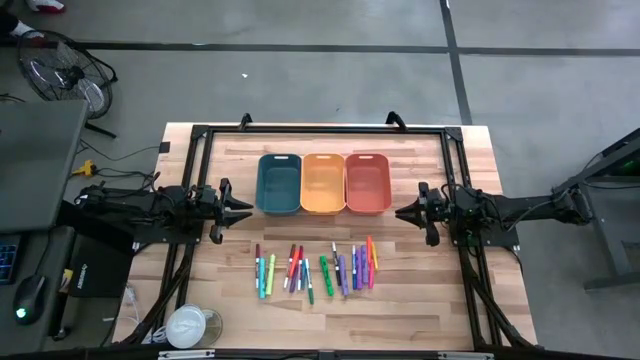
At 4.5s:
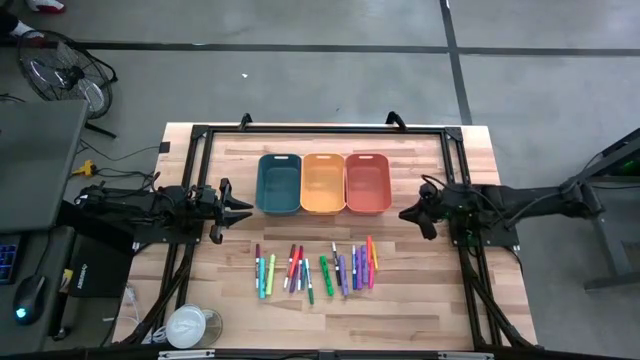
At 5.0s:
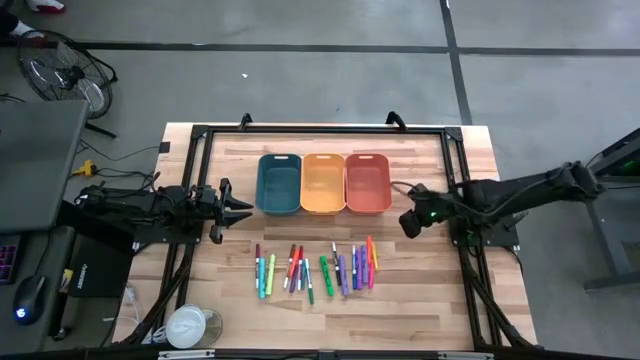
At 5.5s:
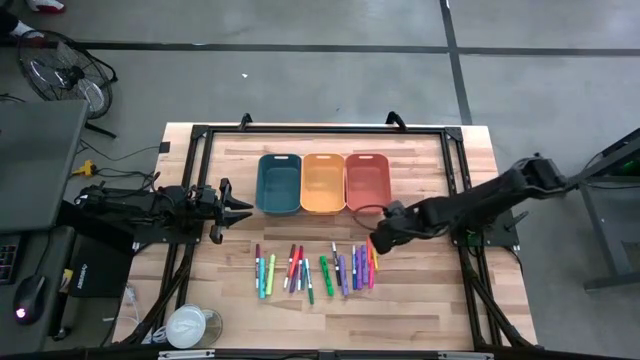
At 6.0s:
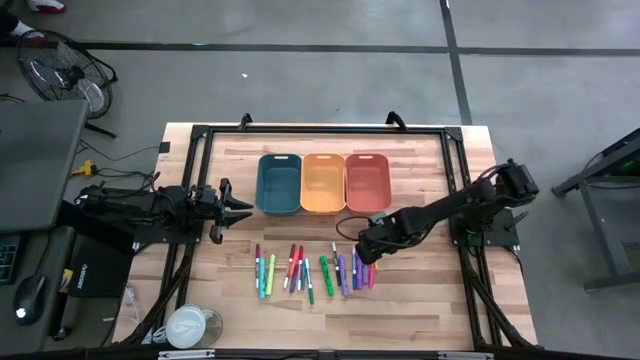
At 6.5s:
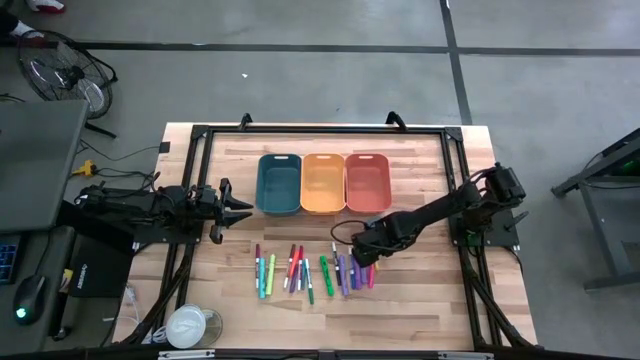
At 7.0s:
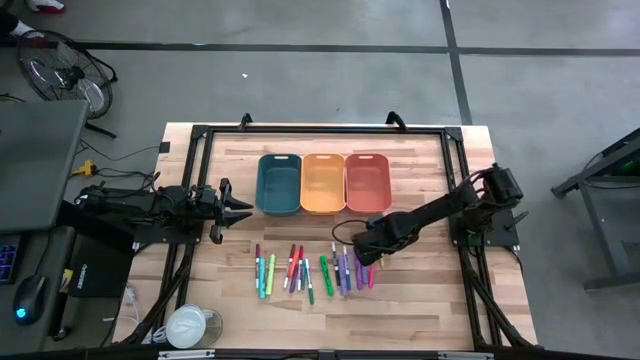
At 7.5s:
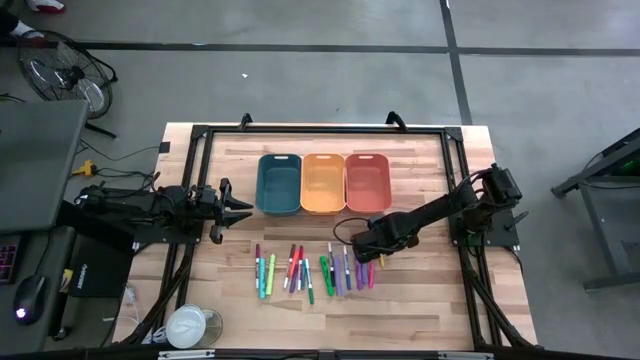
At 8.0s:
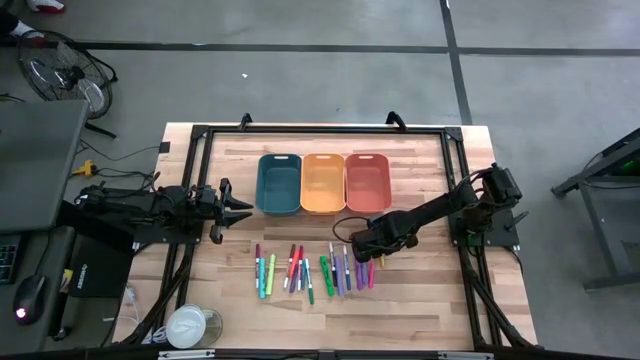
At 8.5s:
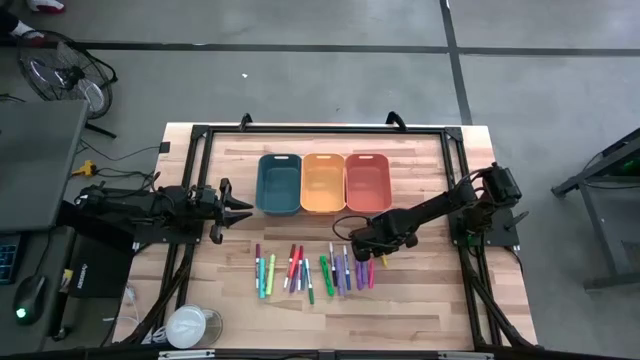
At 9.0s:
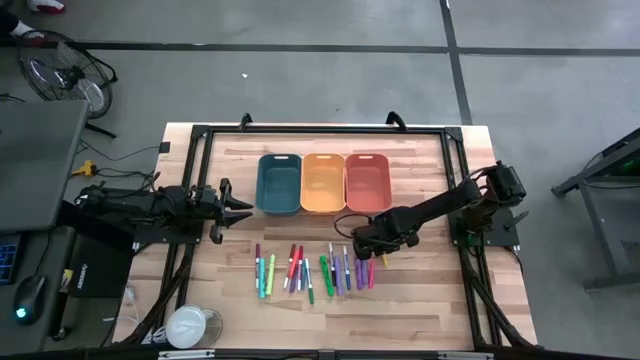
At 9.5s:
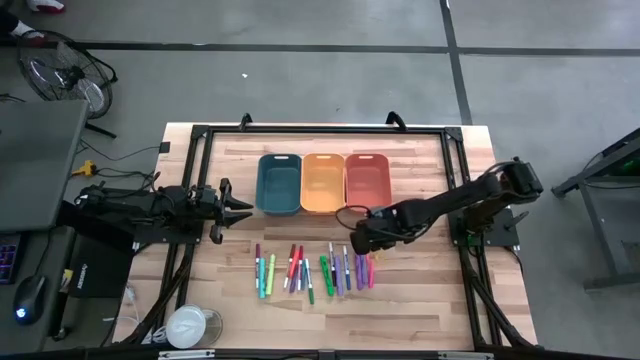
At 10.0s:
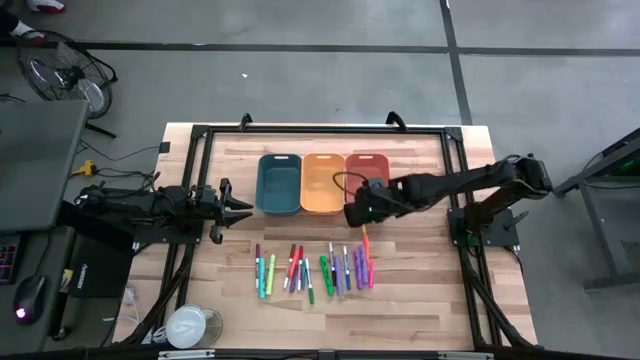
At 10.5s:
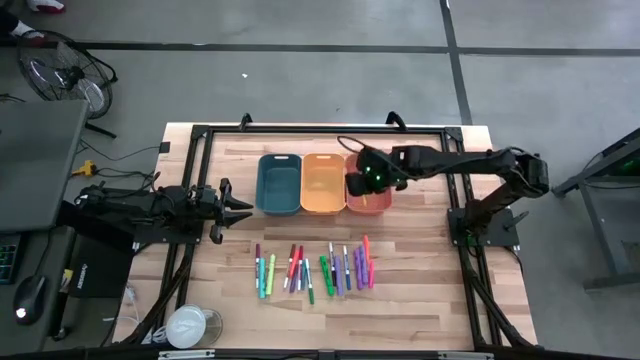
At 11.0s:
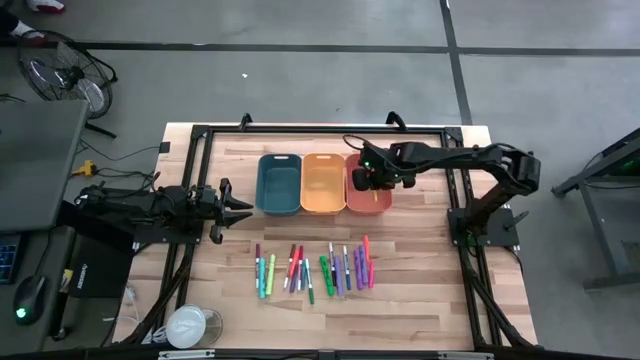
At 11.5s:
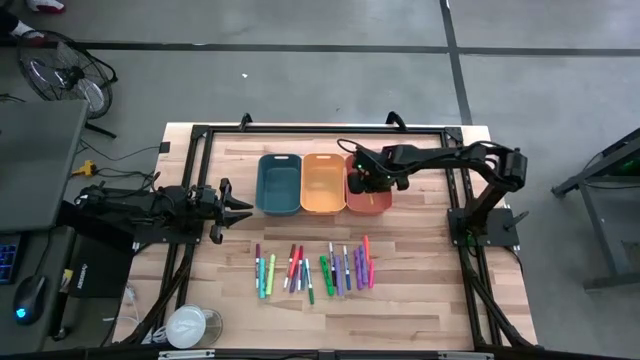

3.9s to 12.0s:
Task: Pick & Place Markers
Put the yellow pen into the orange bin

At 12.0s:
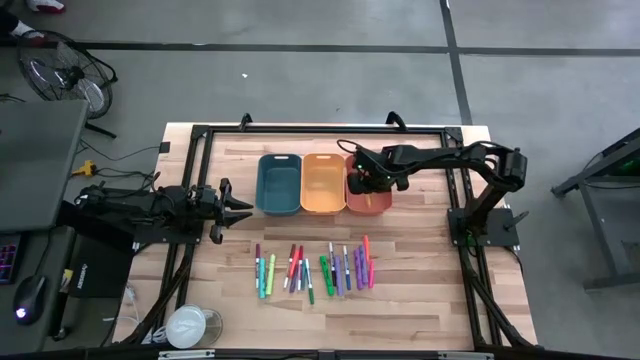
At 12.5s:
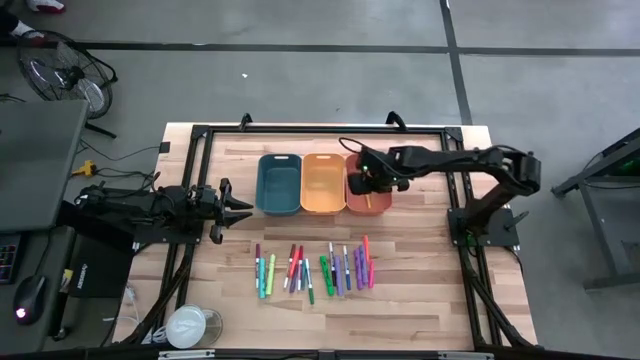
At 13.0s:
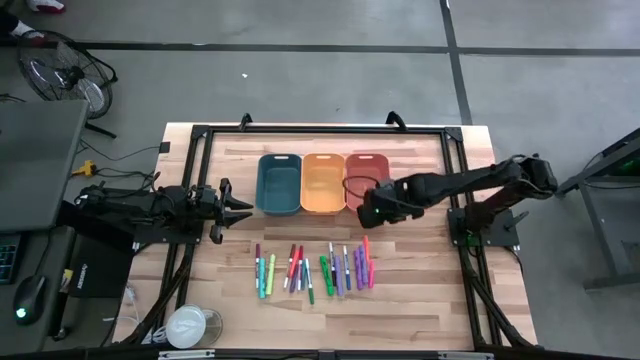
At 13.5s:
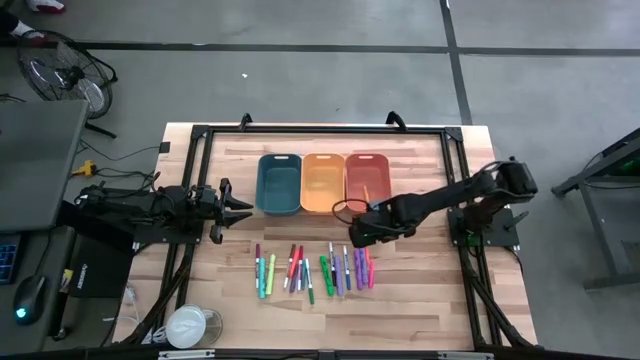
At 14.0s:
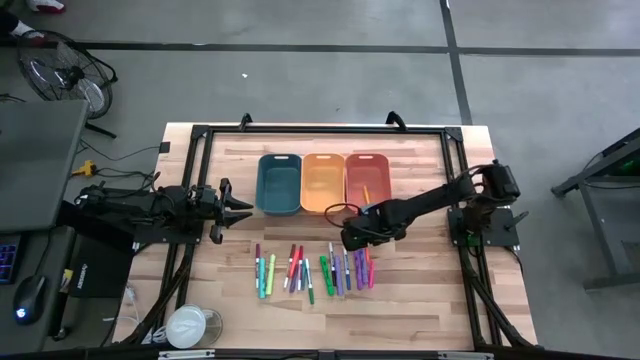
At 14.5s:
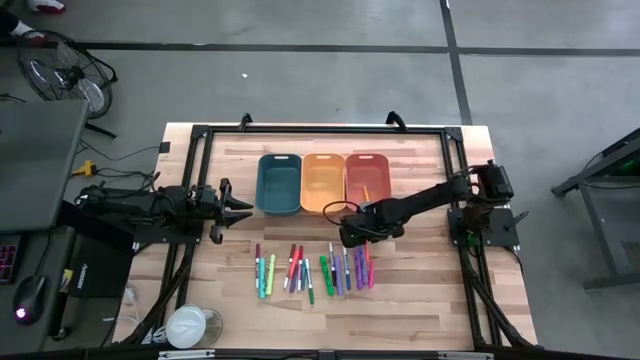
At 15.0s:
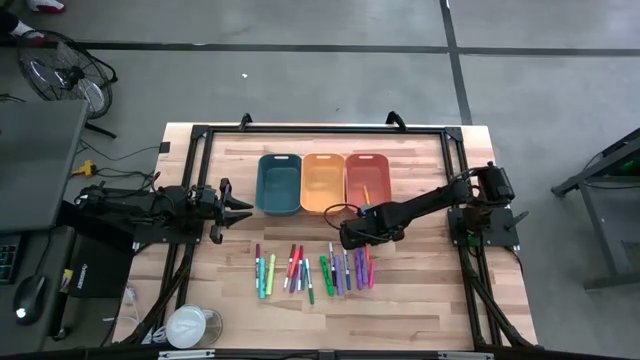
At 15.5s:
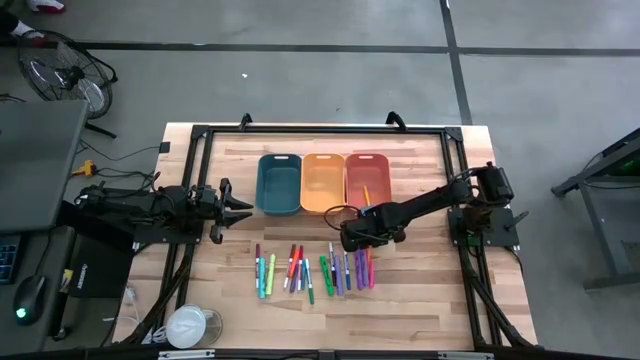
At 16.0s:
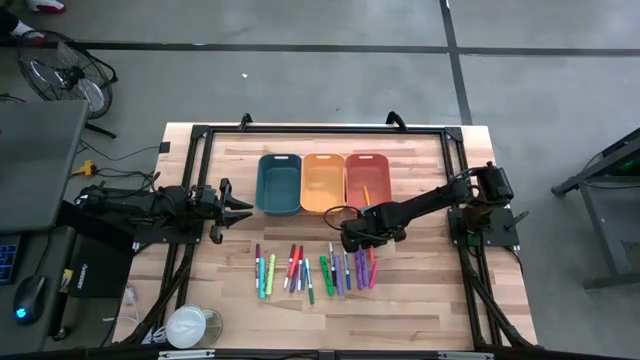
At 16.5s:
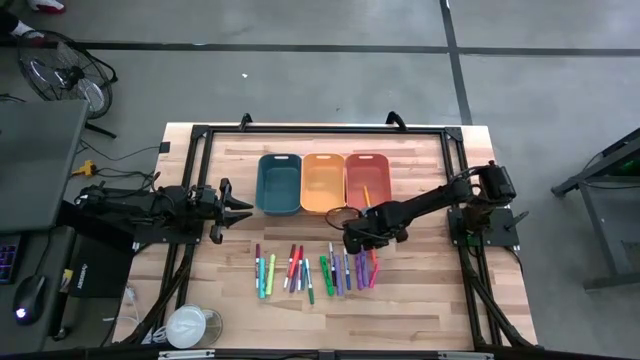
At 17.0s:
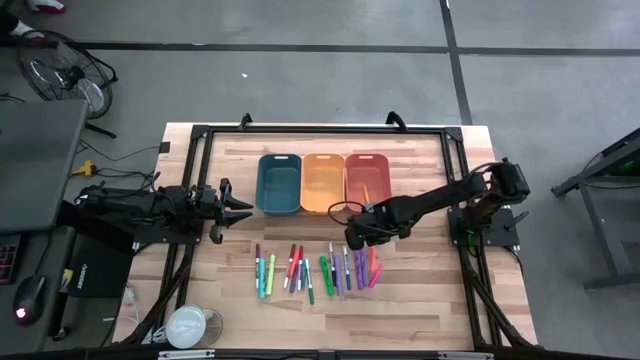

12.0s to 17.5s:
Put the orange pen into the orange bin

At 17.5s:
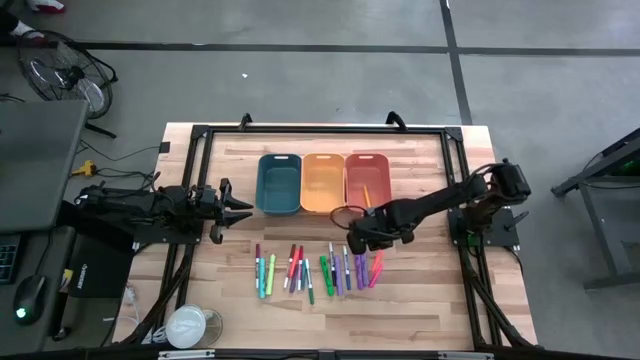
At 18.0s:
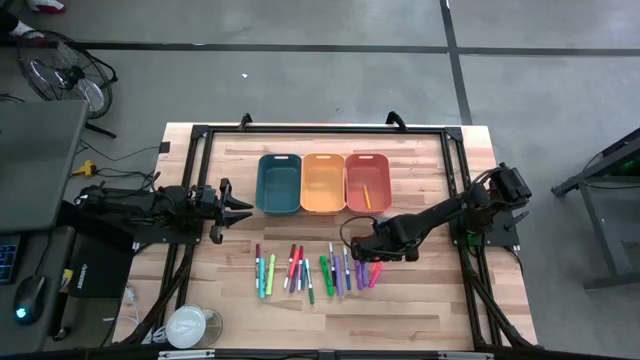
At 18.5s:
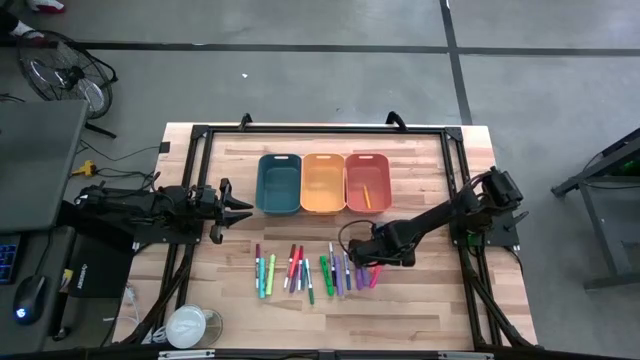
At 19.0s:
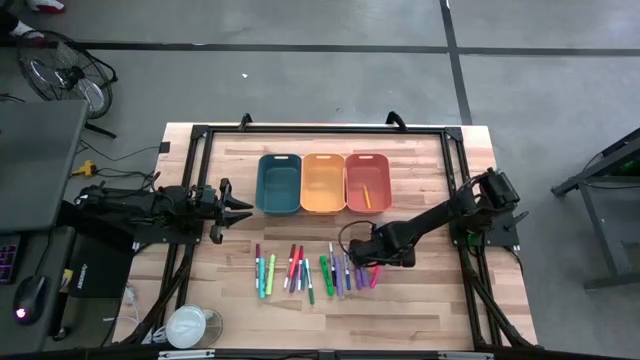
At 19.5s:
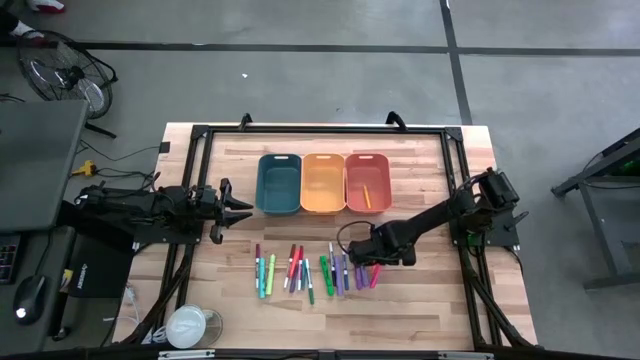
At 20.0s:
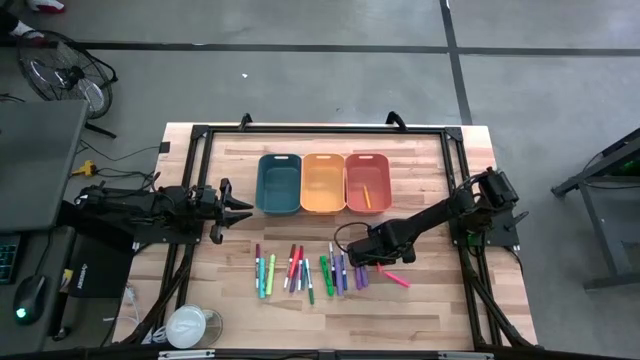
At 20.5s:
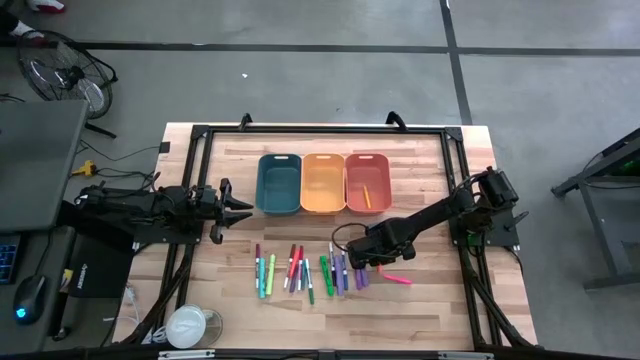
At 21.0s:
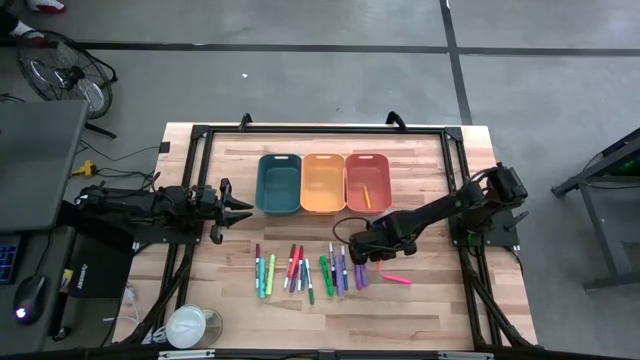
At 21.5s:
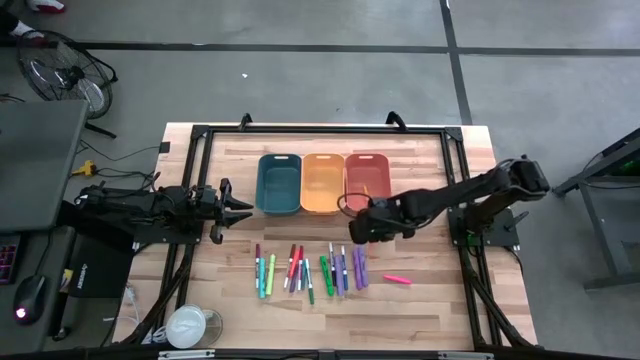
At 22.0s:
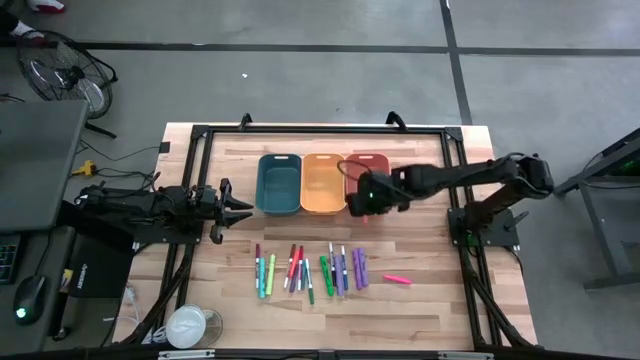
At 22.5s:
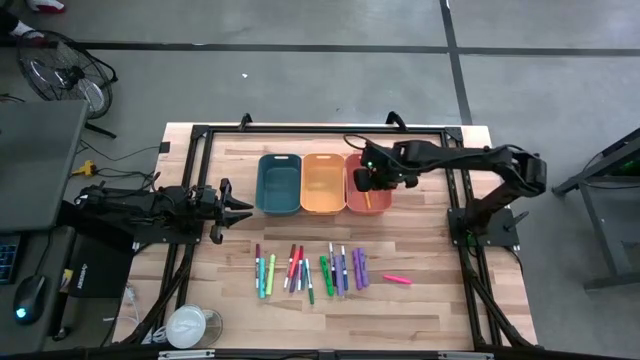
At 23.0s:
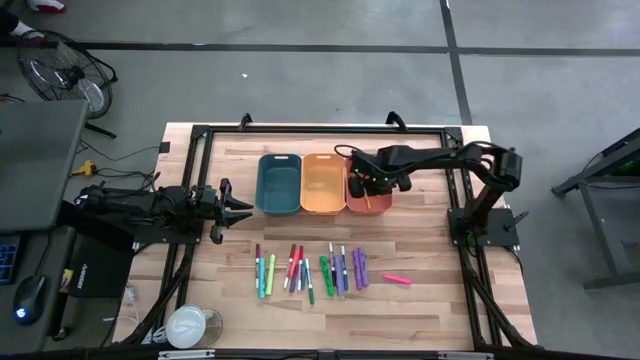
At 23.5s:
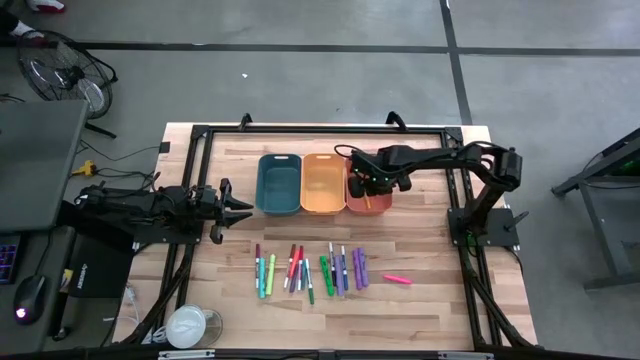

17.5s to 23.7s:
Put the orange pen into the orange bin
